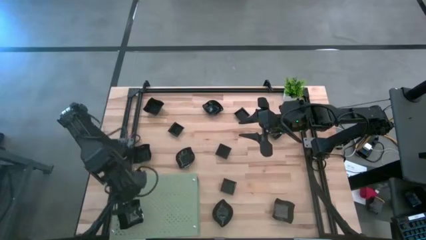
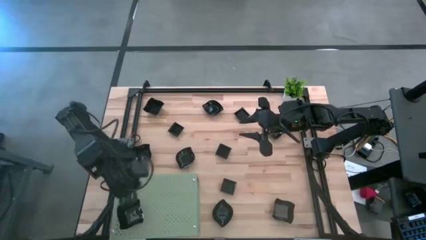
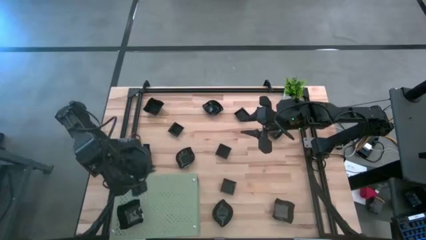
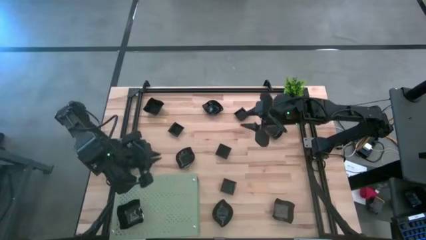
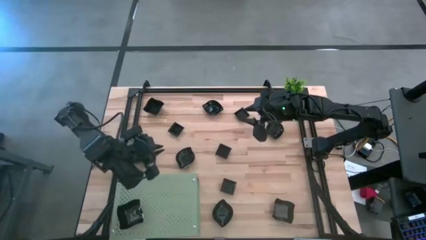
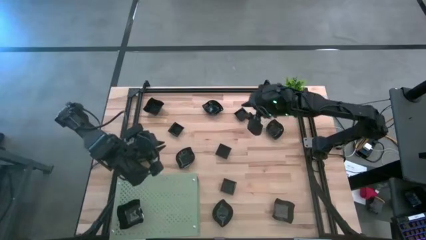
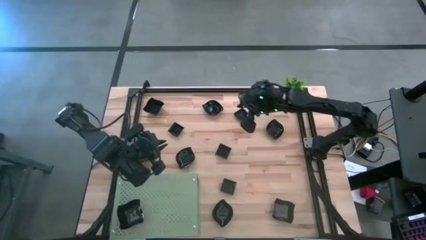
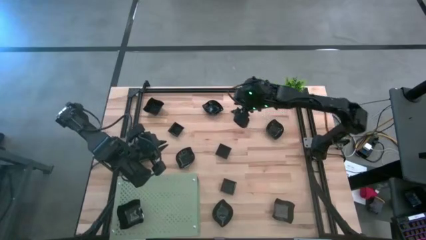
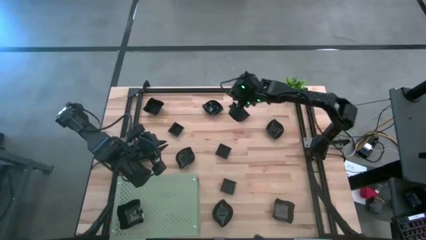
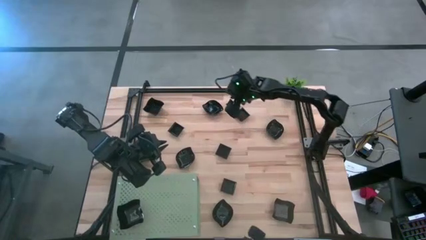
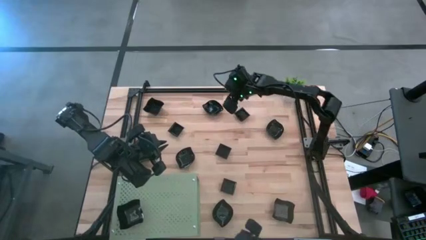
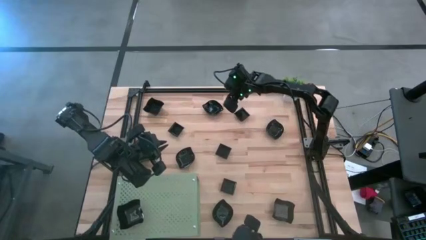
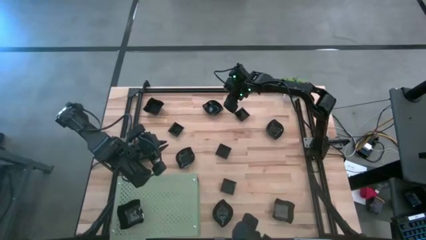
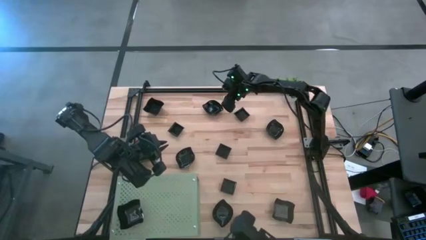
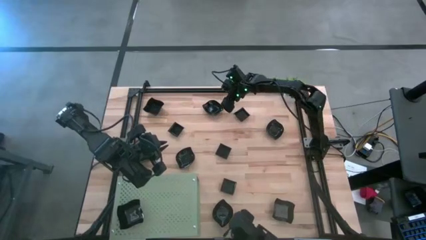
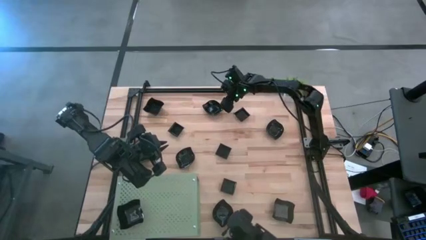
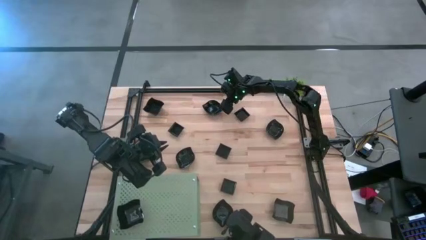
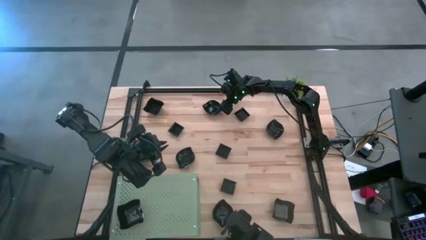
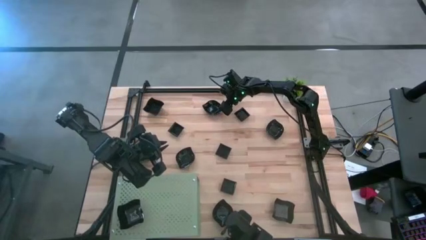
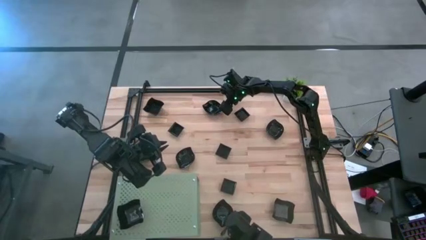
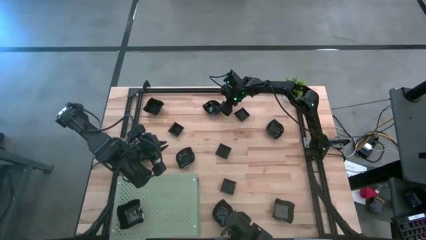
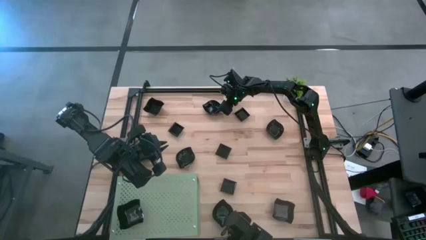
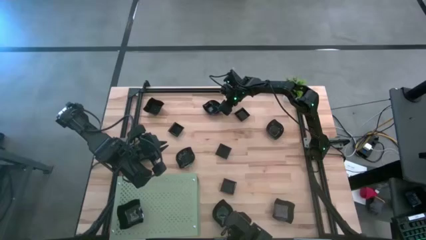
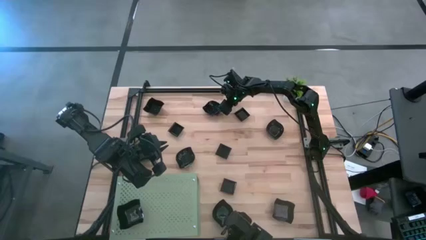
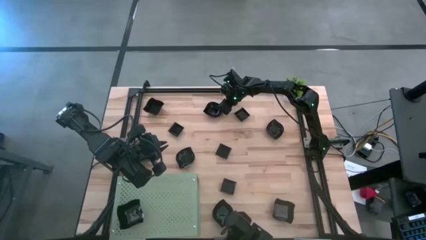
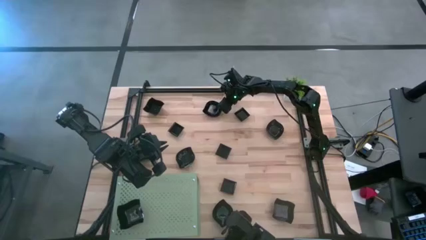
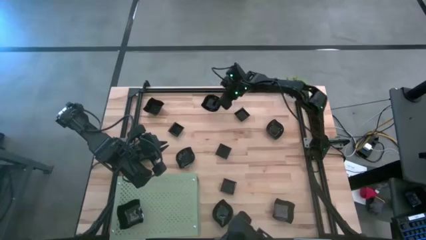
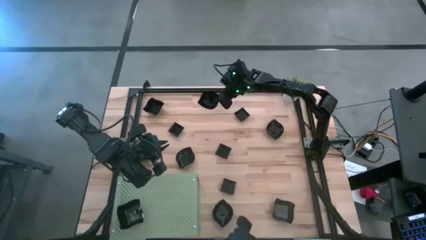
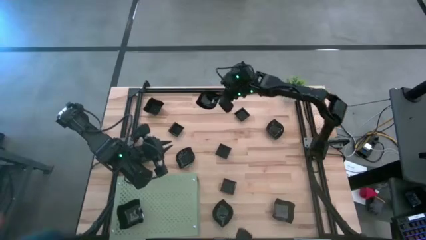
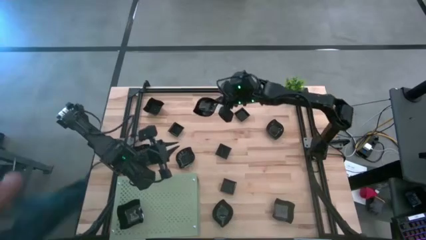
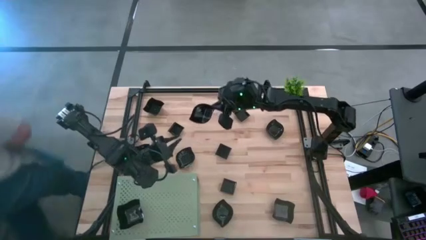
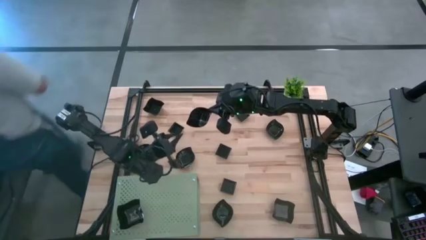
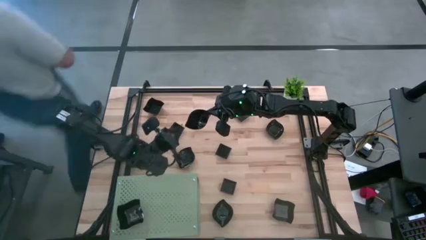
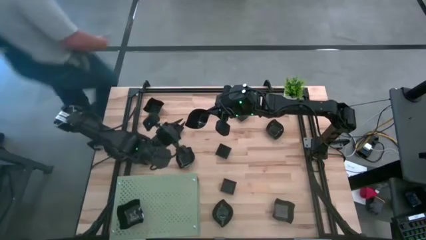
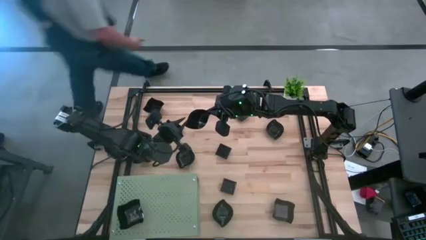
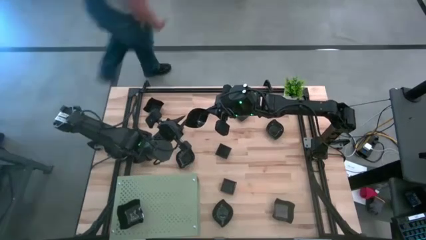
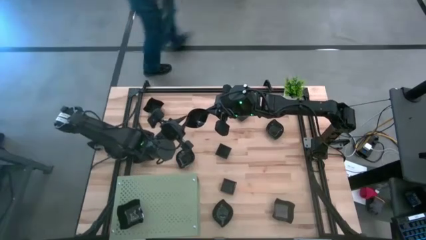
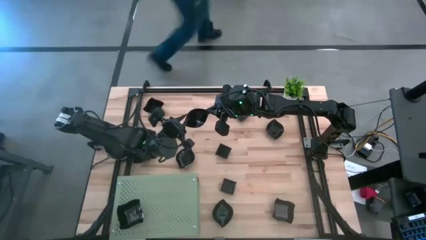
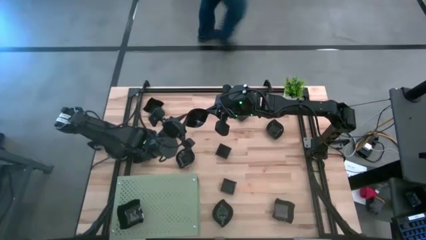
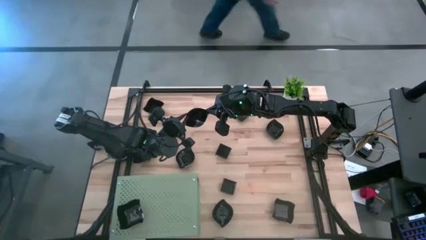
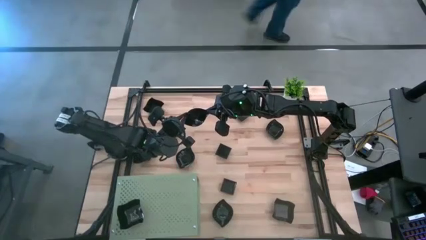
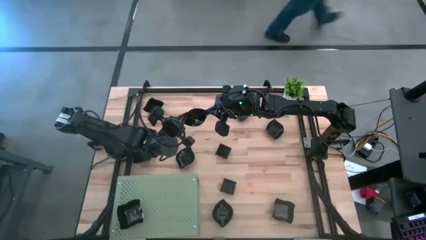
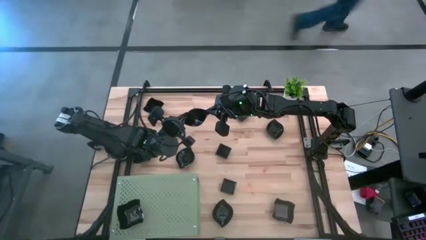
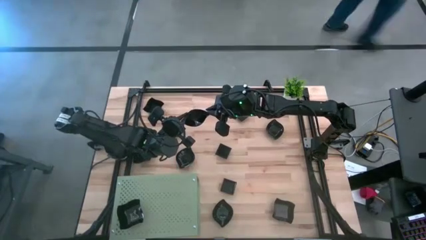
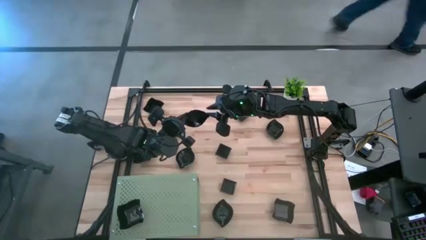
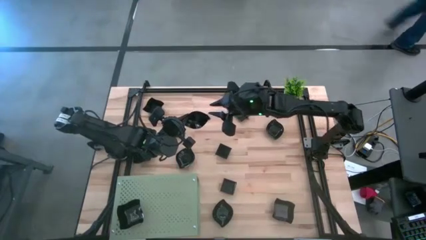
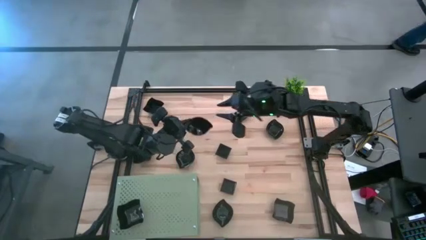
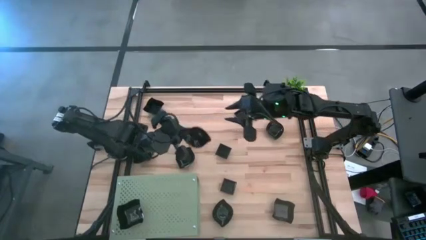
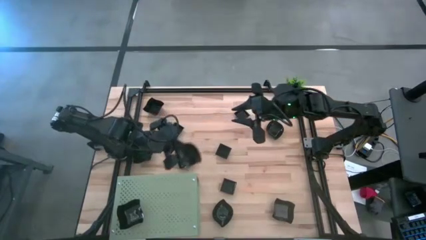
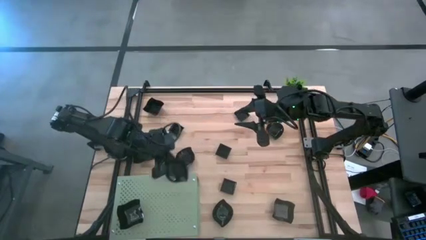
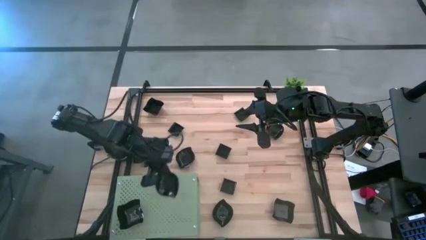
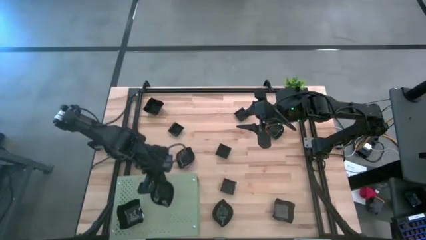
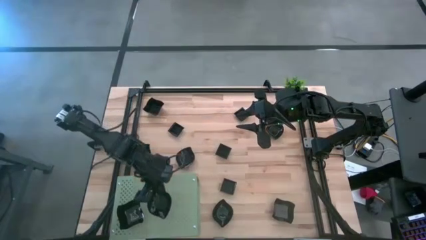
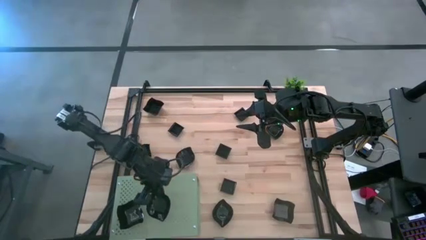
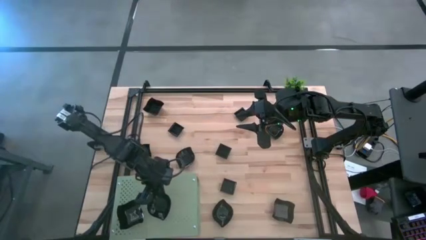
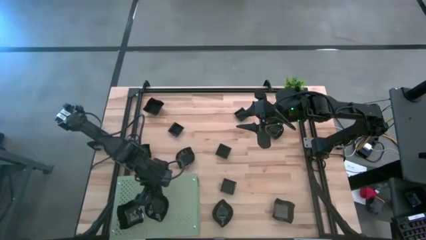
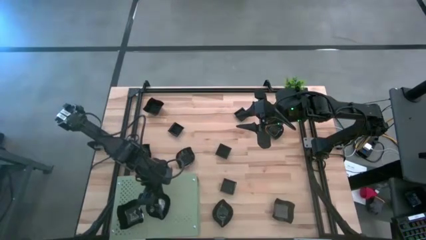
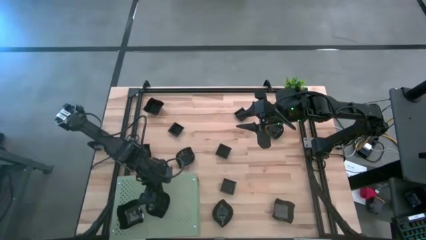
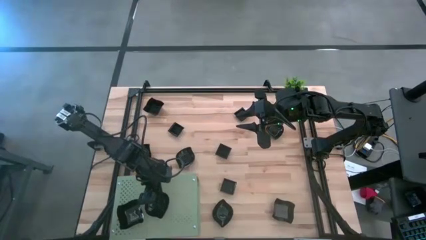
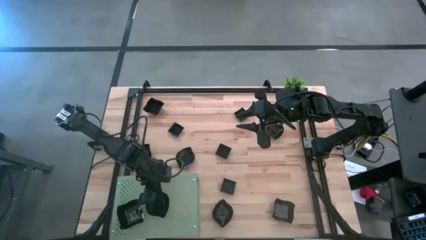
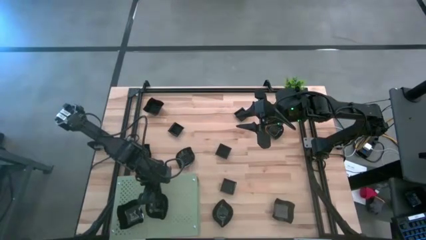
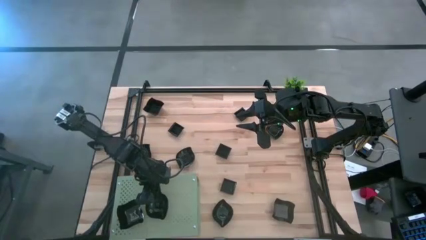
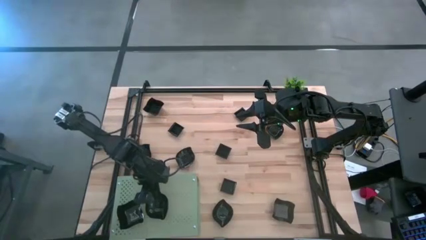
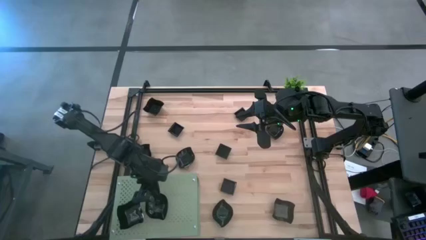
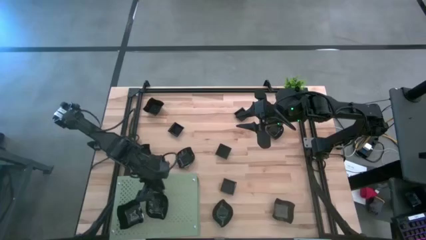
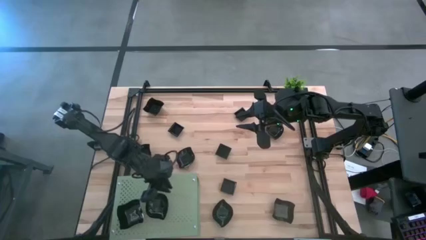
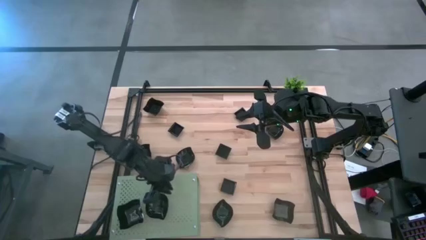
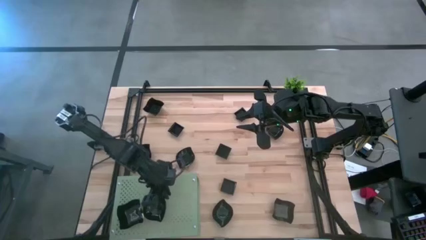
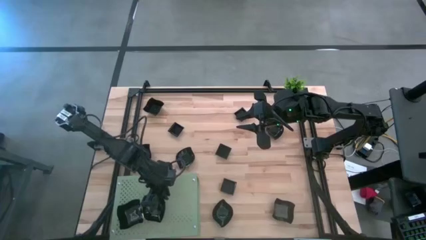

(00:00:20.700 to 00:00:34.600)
Task: Pick & Place Mini shaped plates
Put the black leaf shaped plate on the shelf
